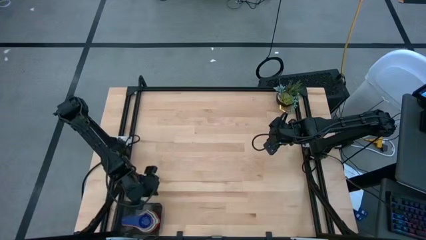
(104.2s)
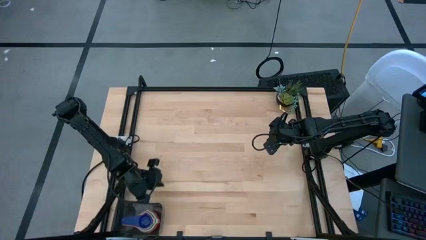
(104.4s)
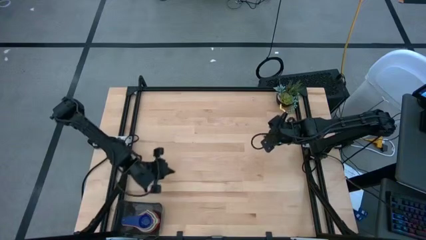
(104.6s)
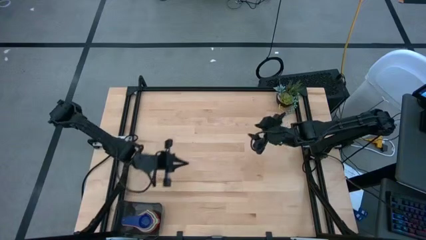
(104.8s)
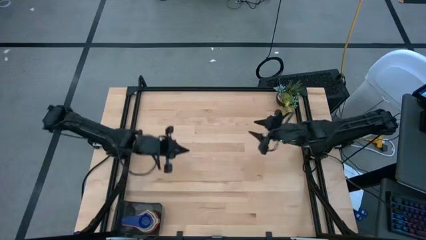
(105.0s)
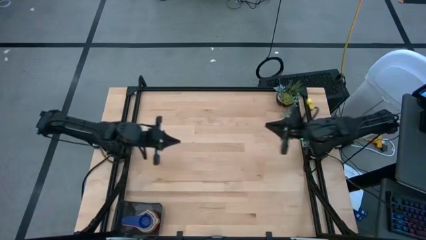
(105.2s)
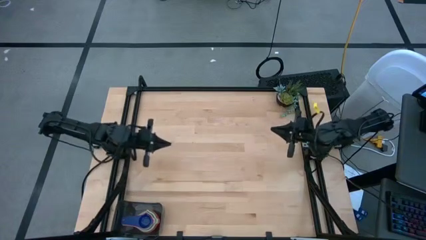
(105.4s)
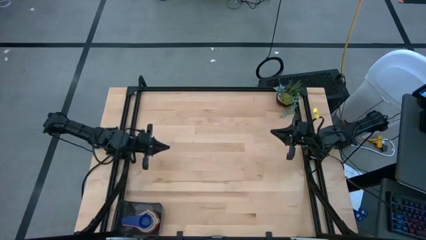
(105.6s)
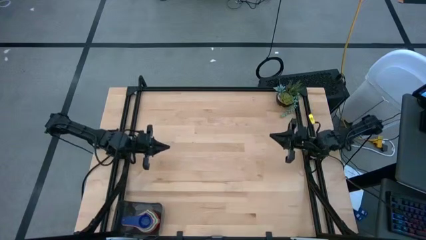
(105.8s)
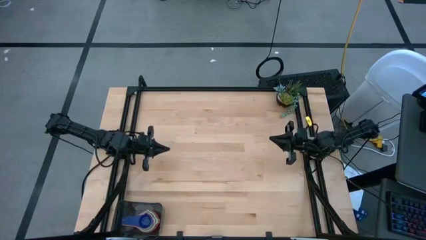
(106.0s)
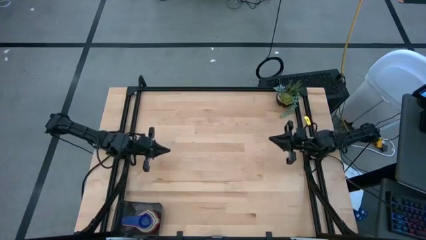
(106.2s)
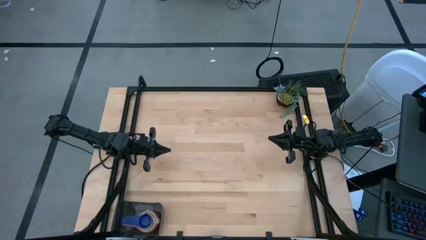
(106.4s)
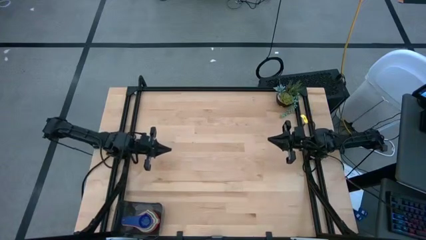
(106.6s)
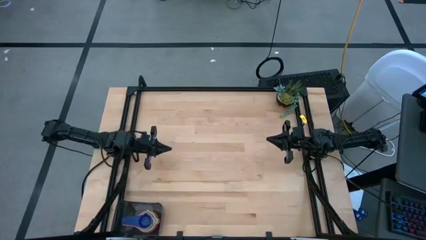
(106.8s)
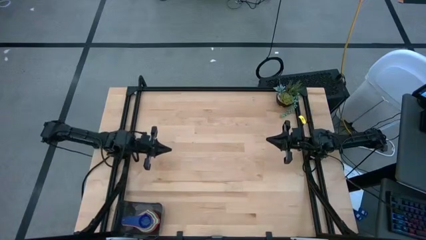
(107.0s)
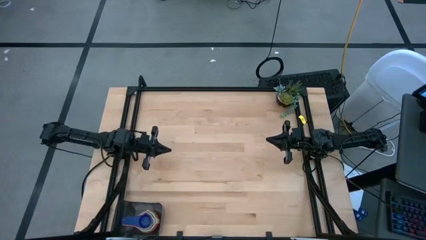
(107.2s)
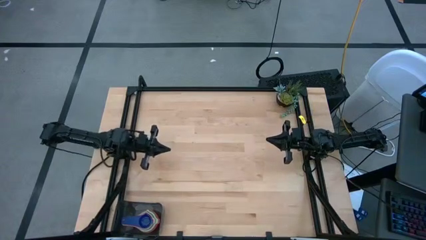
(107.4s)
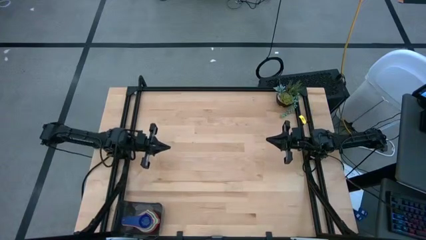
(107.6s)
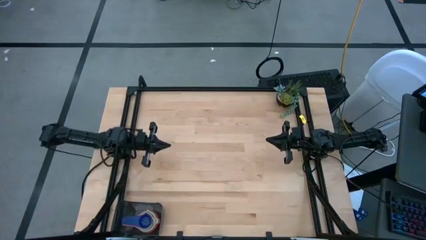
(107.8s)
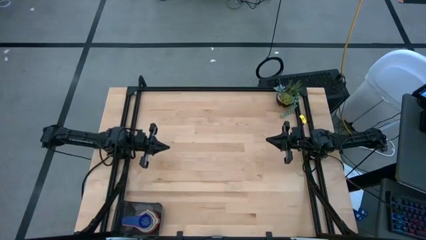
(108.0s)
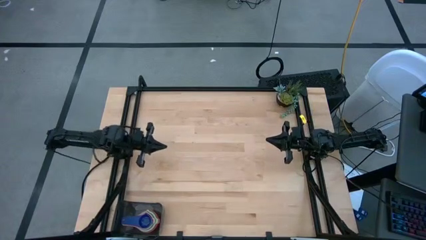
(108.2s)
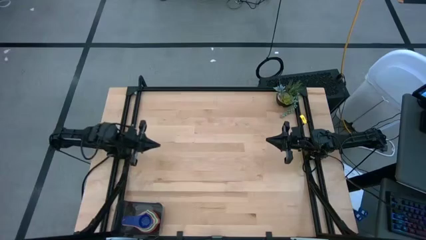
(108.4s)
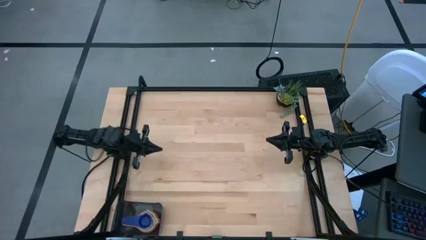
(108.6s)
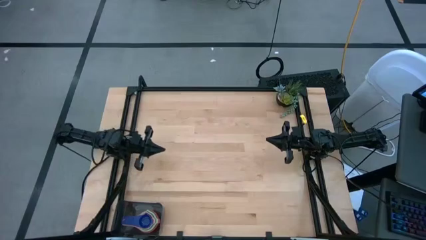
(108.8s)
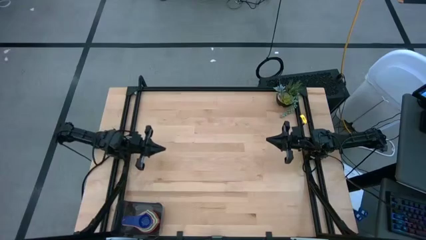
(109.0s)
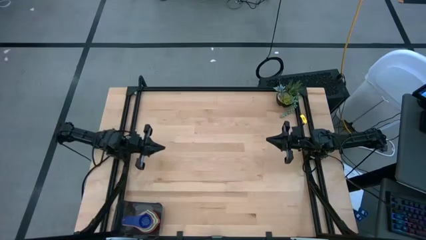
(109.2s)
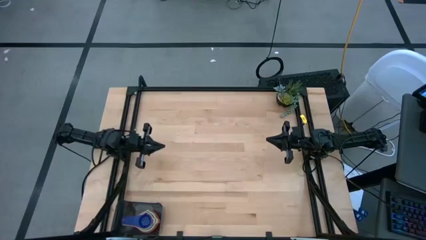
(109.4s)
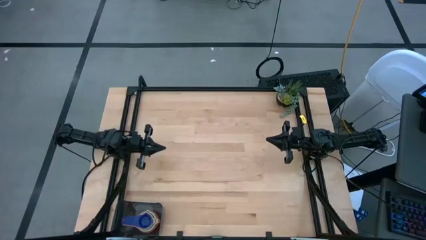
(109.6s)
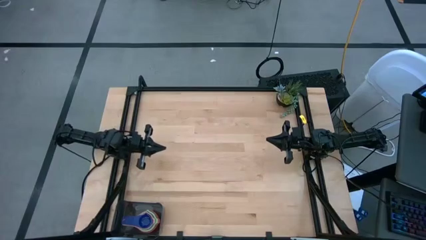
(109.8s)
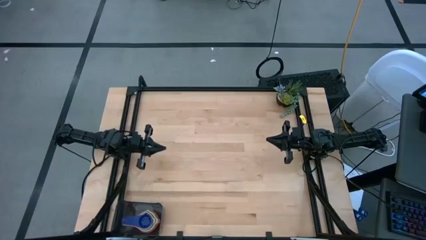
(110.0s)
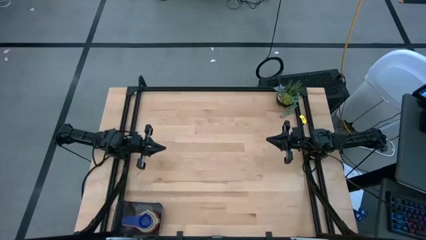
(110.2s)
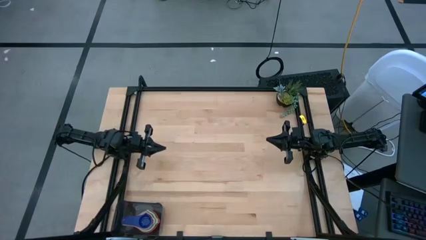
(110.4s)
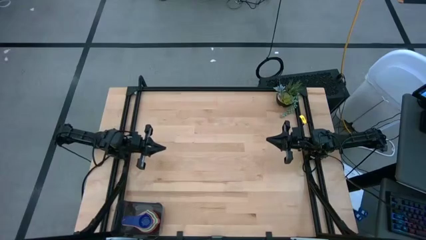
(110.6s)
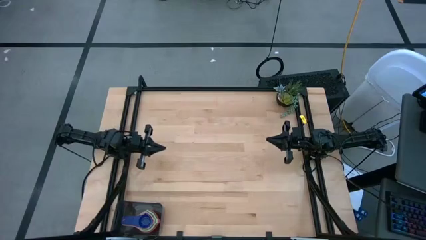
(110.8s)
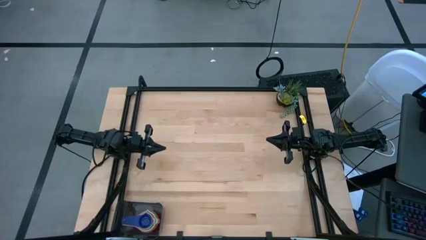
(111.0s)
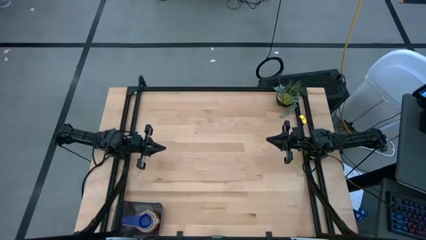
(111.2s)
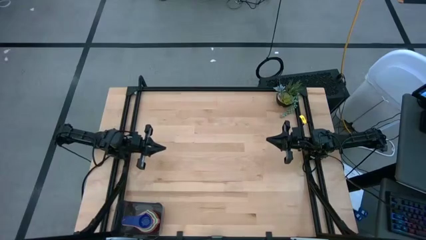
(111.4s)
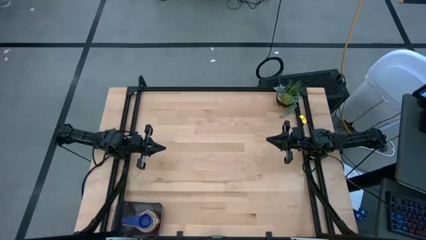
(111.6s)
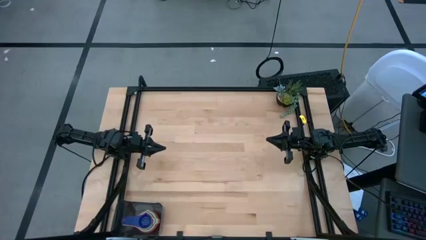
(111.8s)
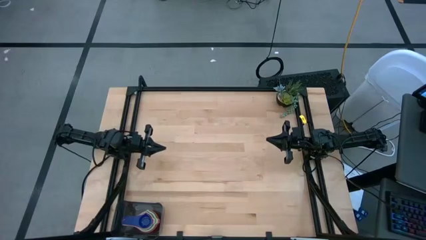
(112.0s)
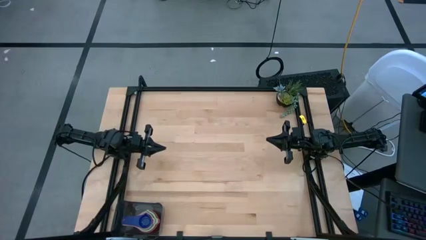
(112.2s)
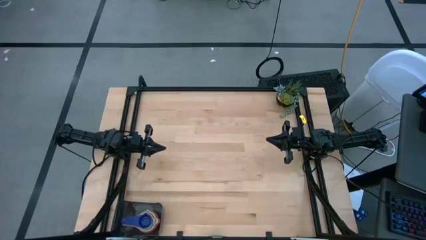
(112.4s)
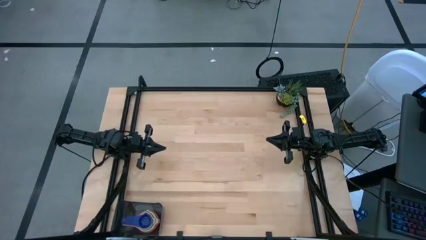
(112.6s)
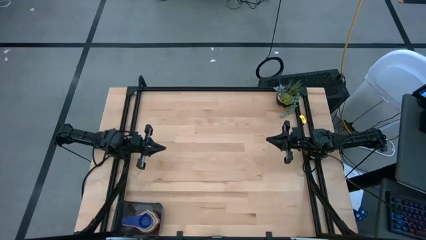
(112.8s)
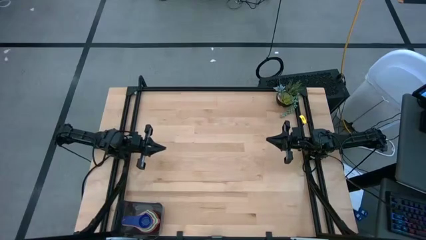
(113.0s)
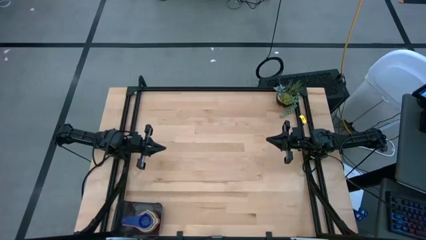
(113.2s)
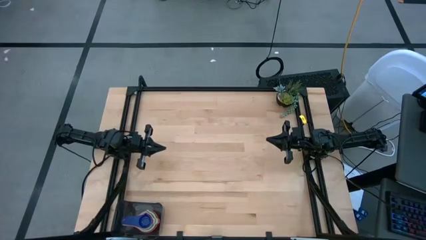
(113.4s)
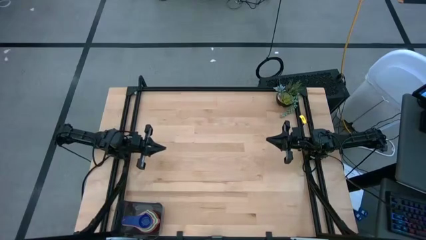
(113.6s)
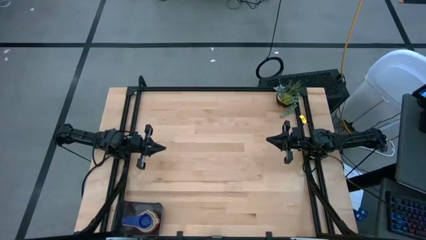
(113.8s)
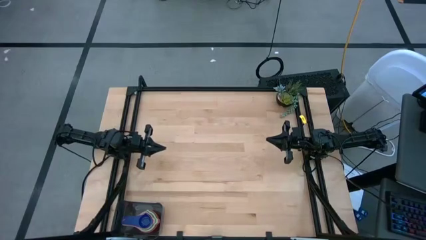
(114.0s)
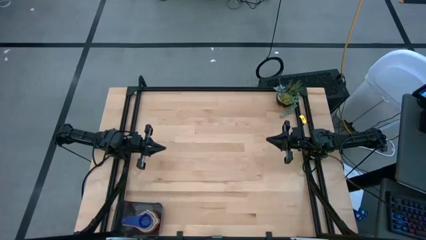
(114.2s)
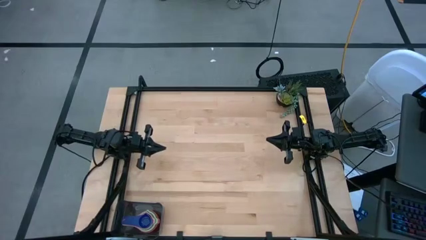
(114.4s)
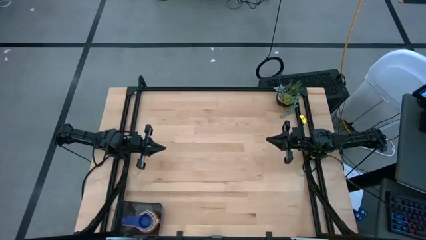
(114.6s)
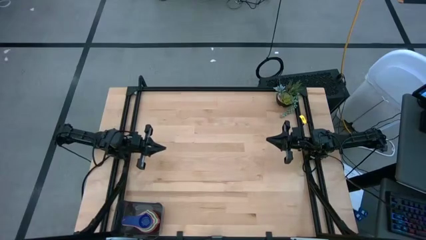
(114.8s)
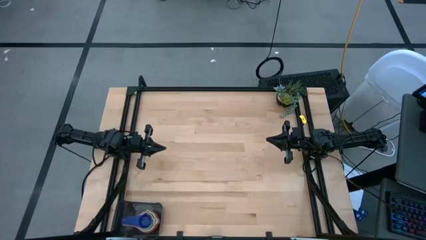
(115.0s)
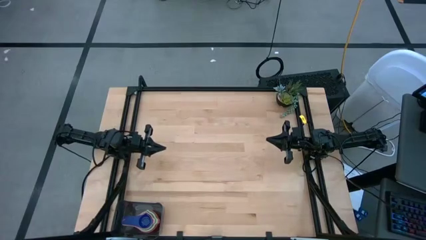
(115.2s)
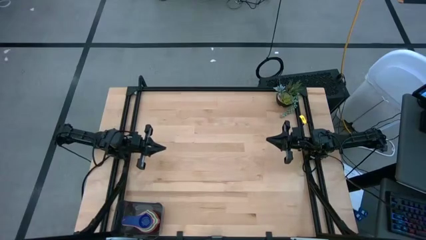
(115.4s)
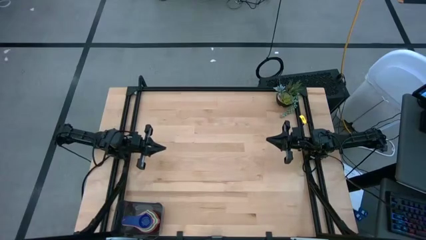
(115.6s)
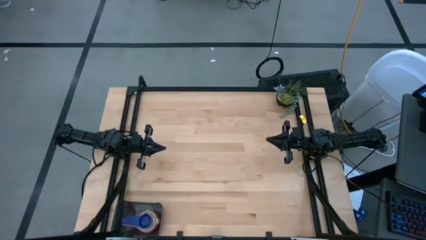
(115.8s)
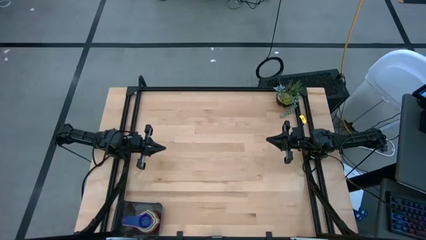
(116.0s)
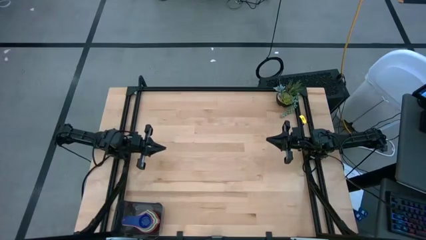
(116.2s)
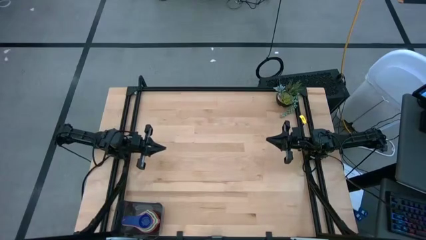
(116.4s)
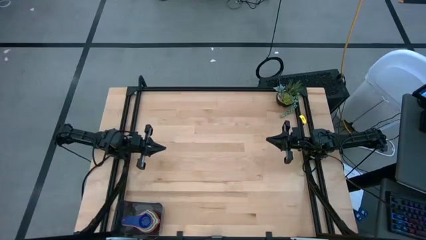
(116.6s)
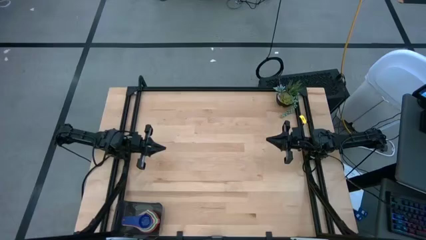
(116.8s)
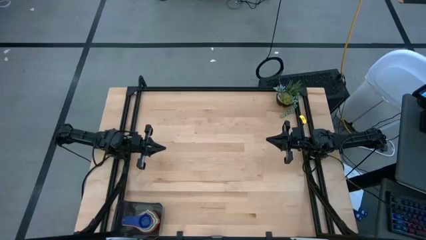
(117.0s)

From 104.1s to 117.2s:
Task: Nest measuring cups in basket
Return to Home Position
